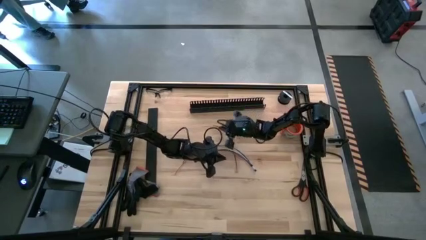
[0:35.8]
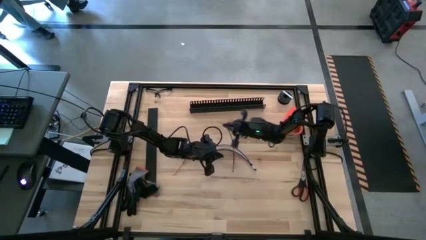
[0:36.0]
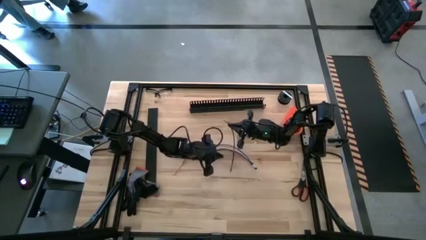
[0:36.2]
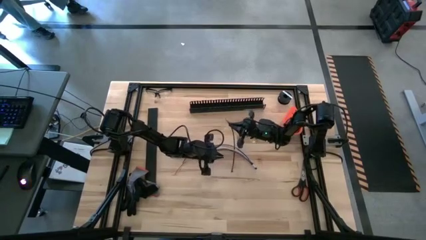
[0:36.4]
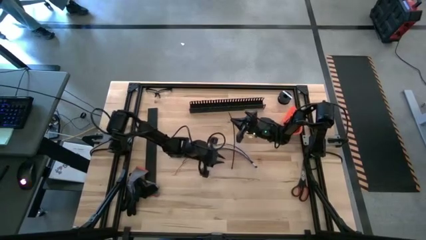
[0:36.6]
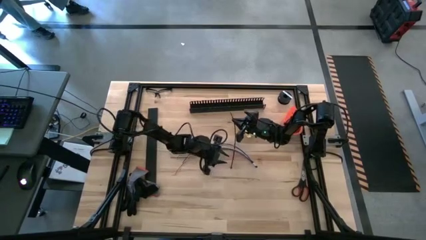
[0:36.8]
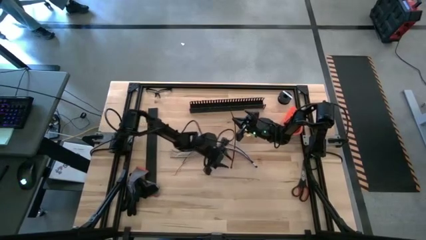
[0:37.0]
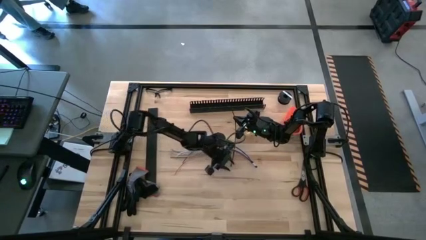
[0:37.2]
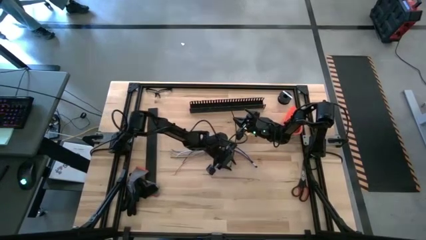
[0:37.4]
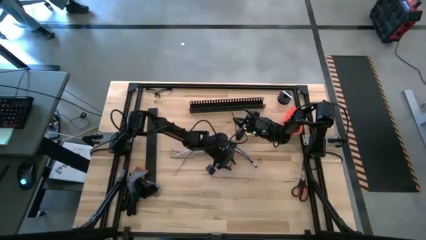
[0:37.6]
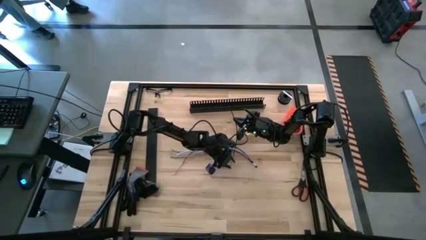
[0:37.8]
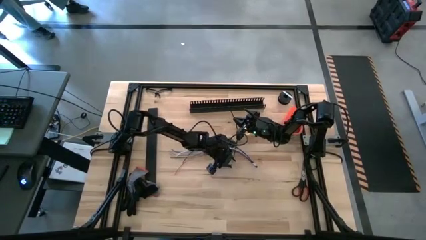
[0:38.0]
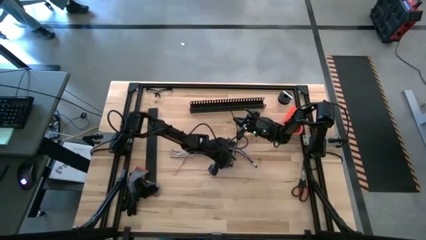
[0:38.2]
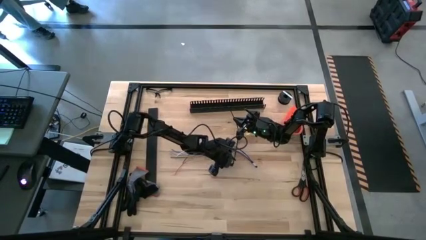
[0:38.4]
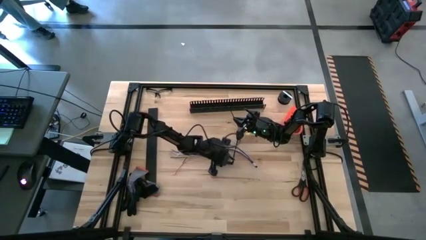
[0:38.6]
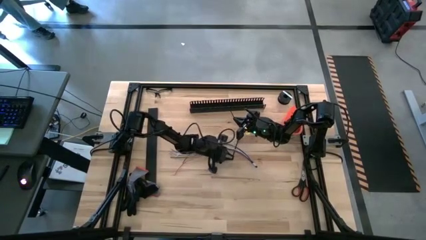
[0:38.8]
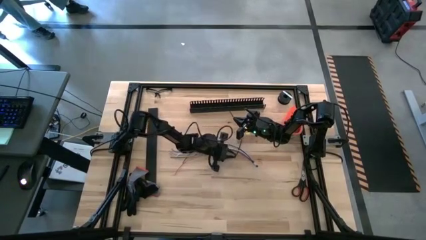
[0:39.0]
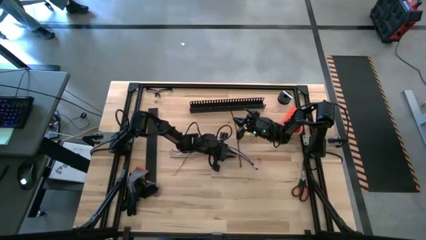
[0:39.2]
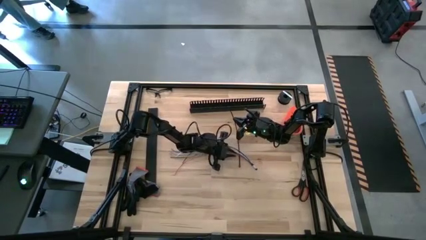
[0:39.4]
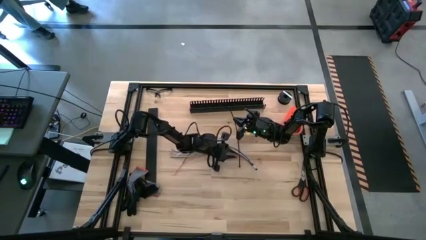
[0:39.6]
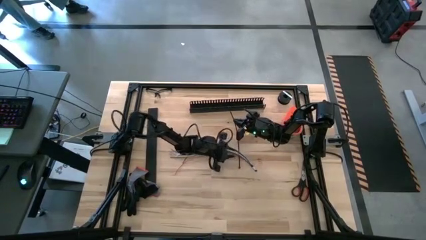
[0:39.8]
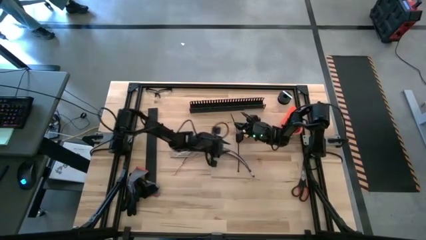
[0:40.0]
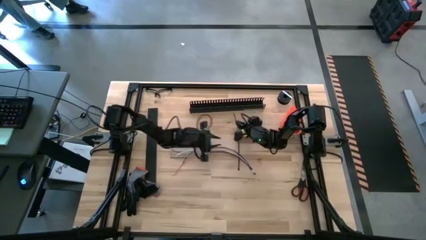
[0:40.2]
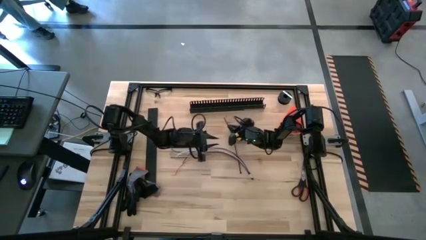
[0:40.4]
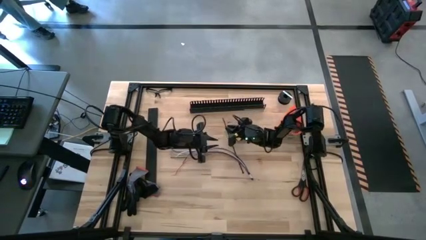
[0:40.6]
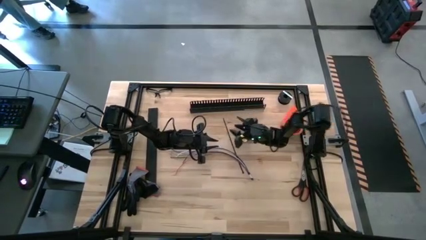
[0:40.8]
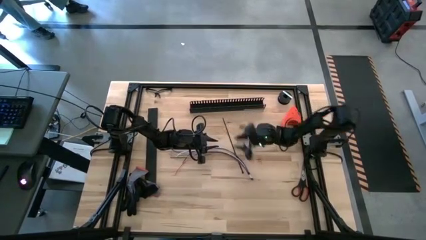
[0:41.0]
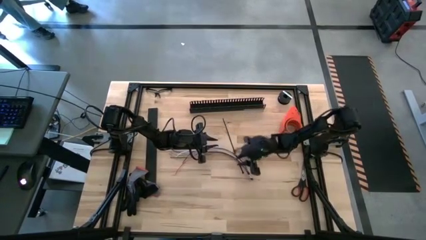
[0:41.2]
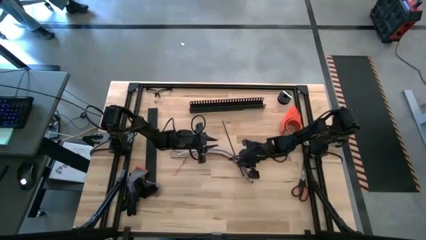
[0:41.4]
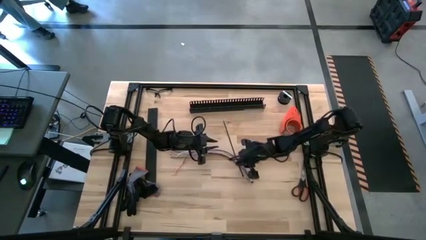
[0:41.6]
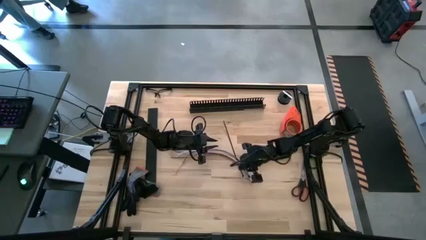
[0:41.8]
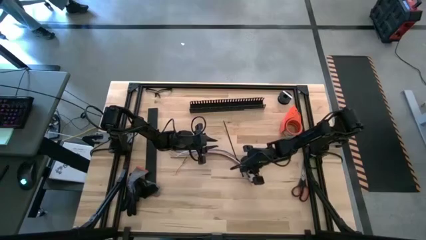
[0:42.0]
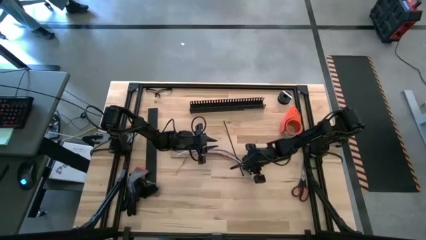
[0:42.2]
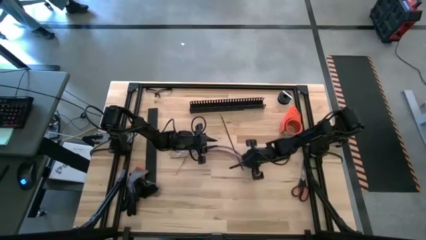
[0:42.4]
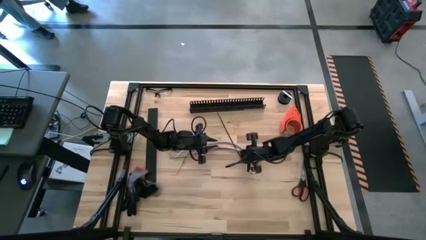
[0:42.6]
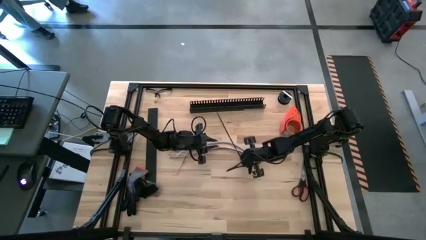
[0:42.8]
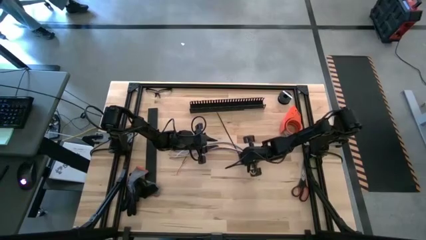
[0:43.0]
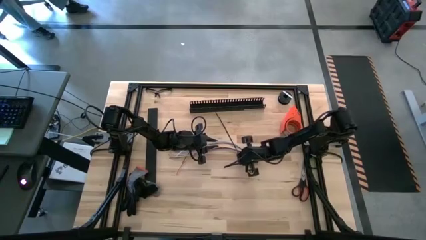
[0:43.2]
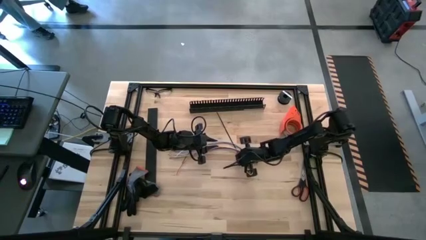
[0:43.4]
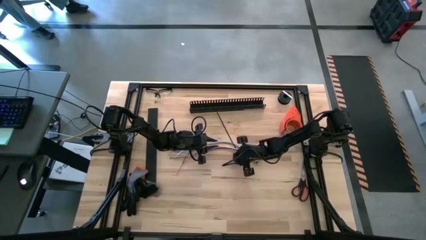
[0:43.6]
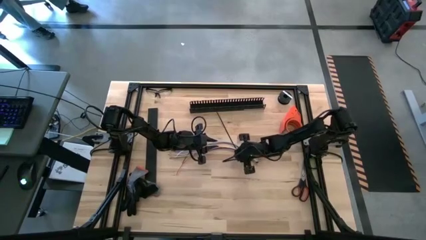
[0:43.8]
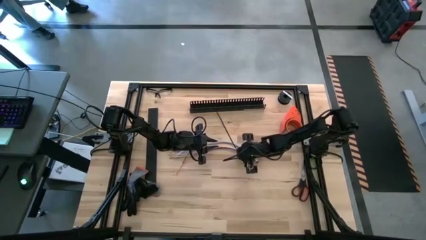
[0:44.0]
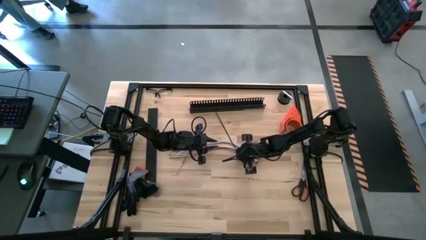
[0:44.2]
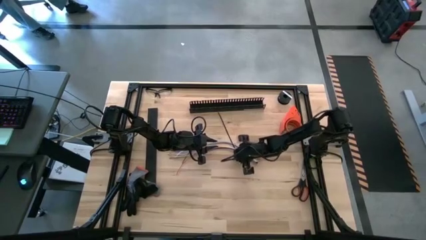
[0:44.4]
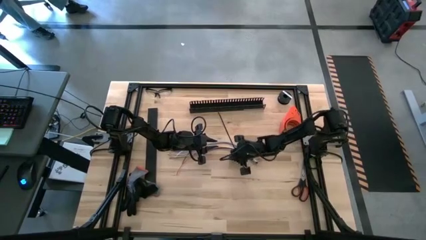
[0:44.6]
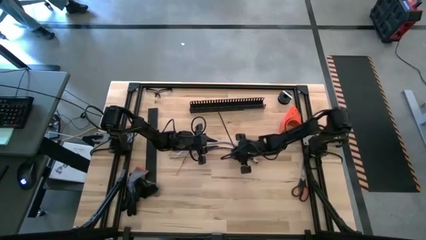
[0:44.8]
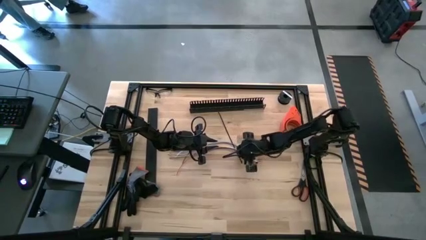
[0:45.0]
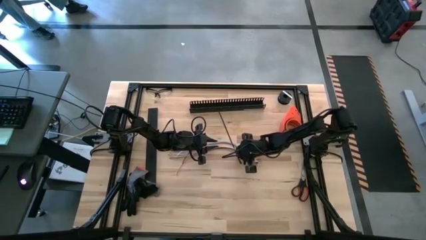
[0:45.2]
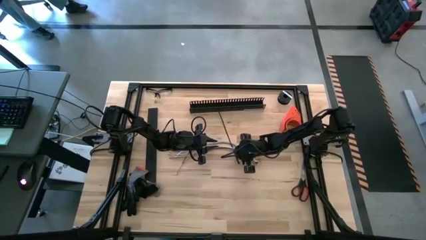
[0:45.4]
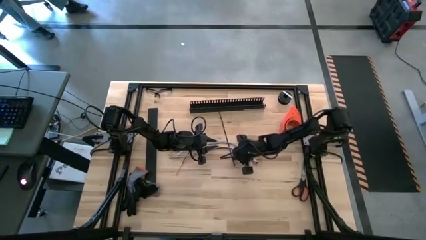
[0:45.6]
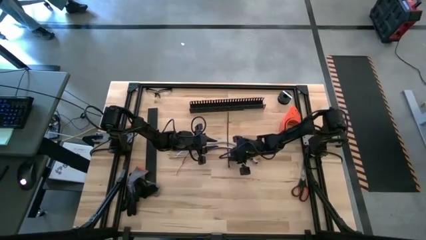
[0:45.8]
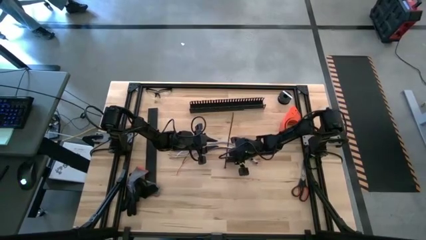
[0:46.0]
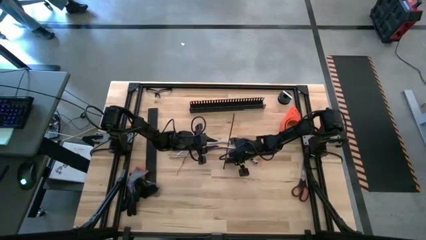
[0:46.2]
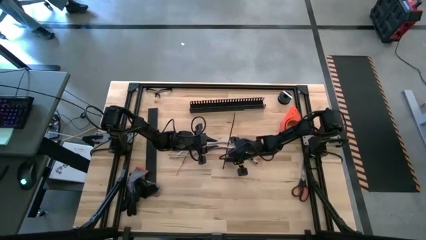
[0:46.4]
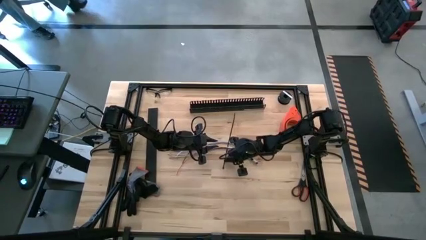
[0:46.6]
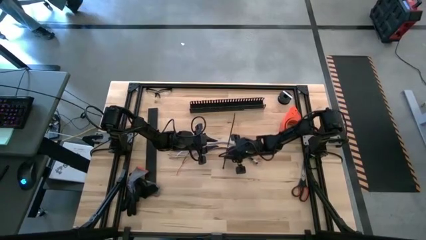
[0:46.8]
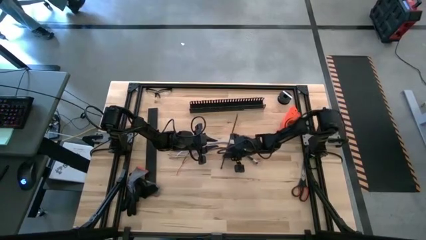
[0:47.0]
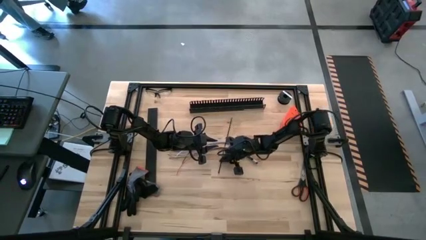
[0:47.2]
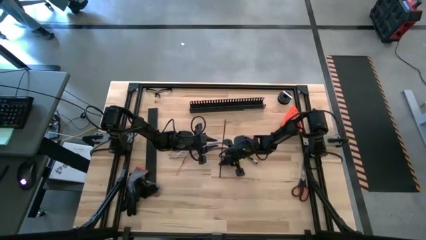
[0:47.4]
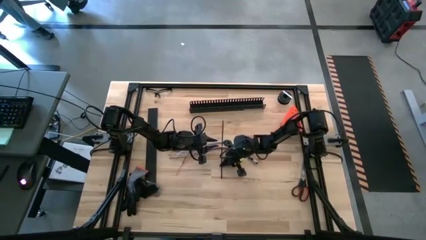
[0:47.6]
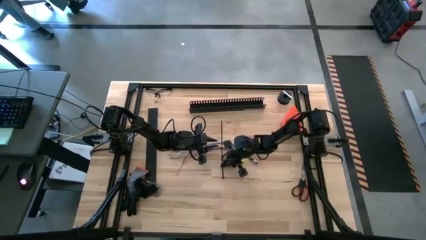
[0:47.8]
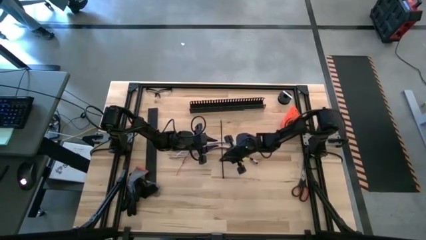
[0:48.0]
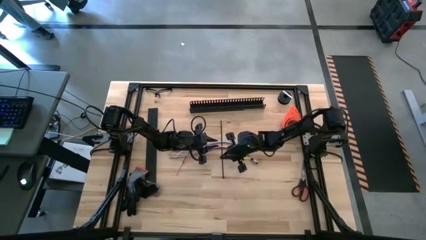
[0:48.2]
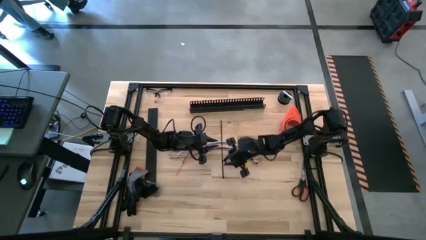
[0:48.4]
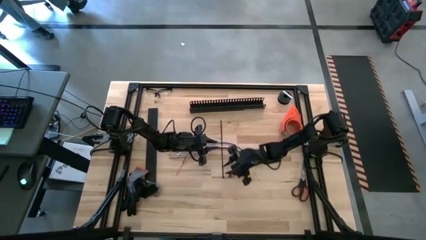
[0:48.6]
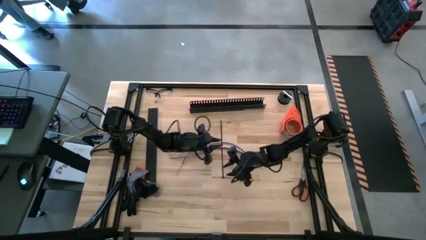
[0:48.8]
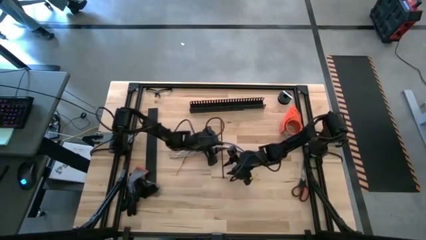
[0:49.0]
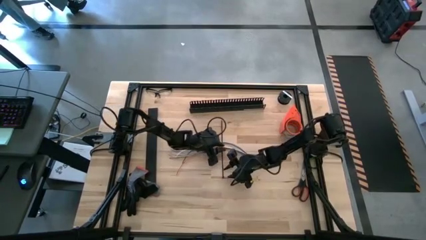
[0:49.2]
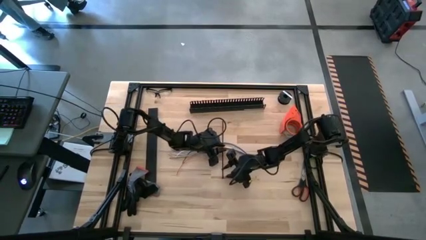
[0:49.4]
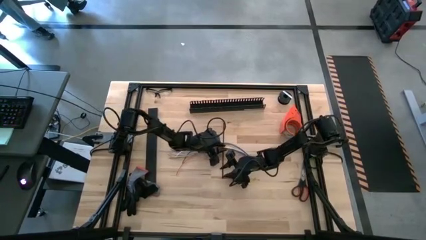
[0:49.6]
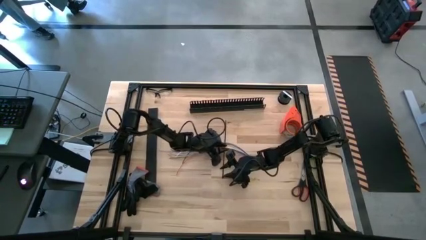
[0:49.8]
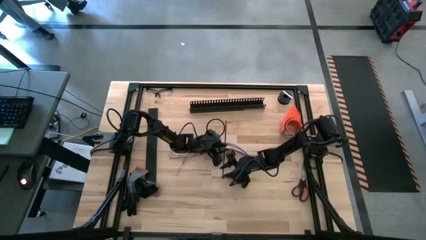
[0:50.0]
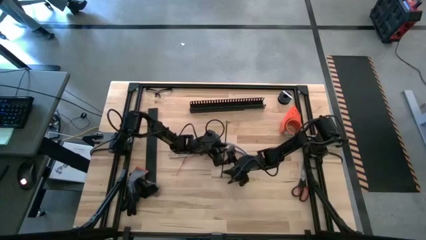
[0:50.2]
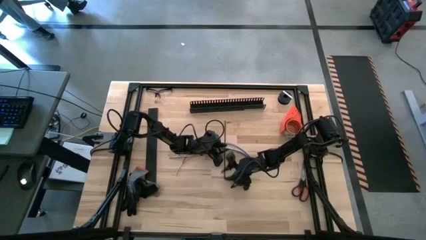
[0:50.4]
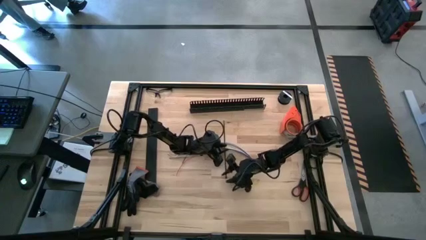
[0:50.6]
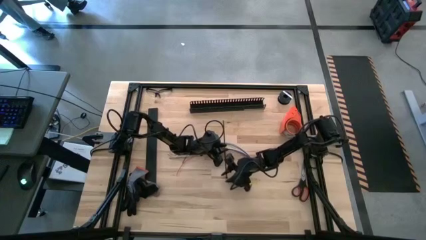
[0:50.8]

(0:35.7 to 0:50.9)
Task: Ziptie cables
Wrap the cable wires with a black zip tie

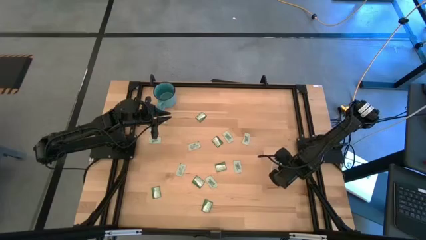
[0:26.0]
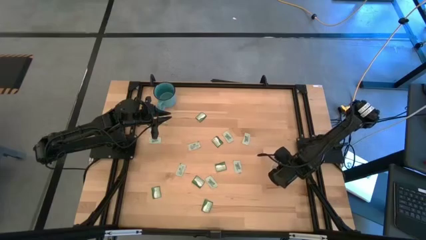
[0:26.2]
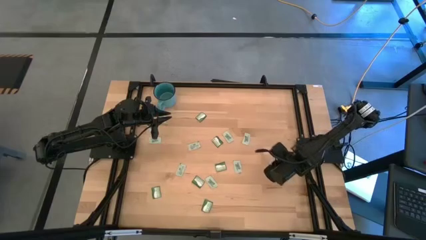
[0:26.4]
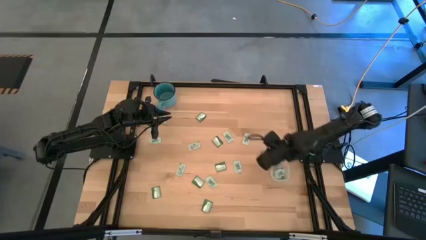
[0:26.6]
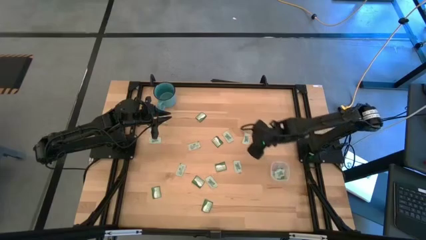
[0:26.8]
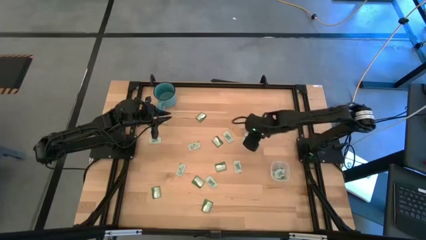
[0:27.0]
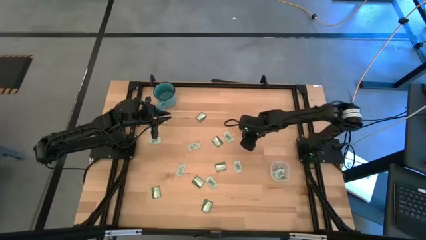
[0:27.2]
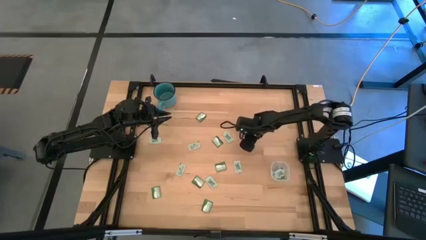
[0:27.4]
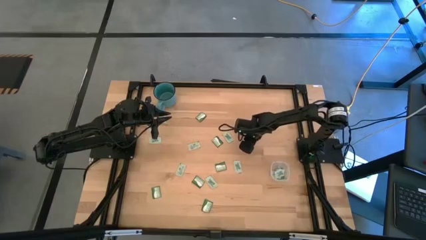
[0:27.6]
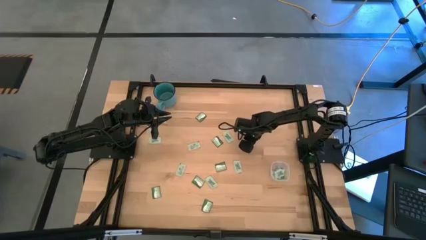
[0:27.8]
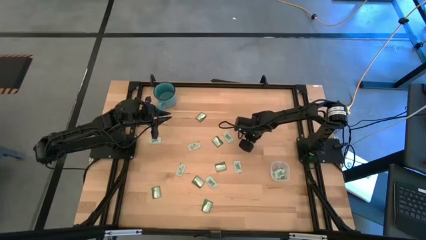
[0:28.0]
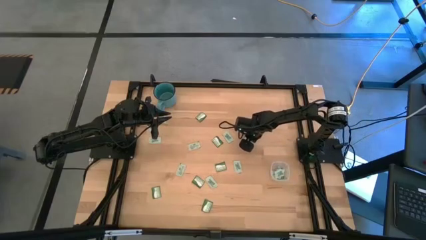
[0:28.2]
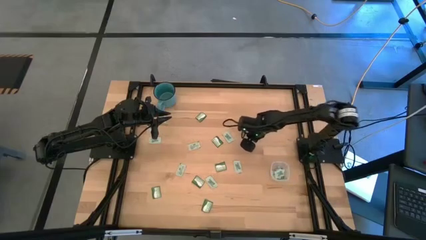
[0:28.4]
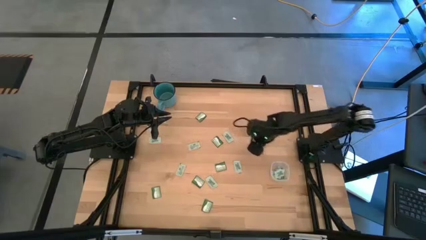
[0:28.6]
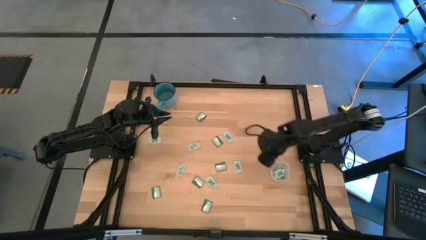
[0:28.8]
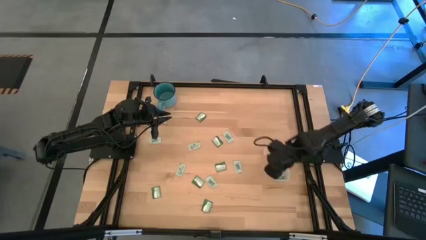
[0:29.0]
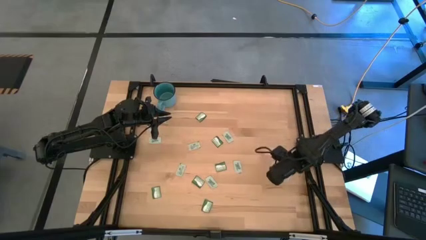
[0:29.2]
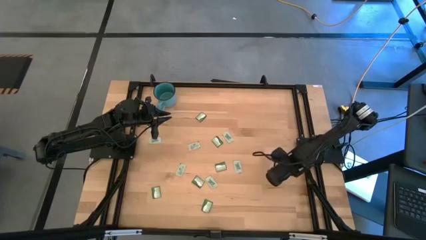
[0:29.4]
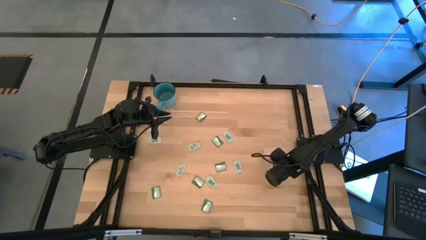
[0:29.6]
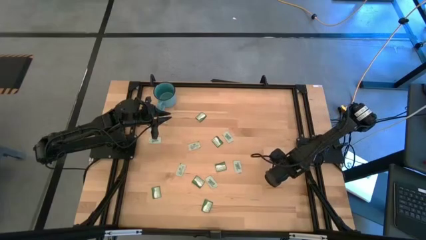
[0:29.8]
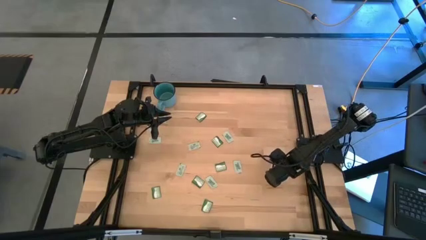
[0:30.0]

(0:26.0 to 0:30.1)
Task: Pick and place items into bin
Put the white stevia packet into the transparent bin
